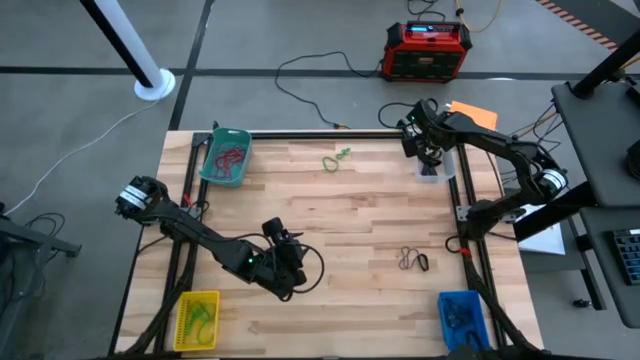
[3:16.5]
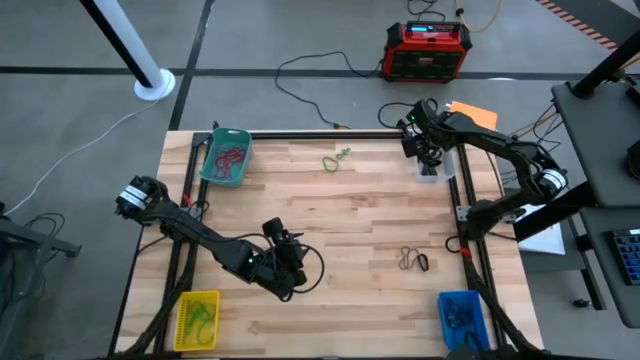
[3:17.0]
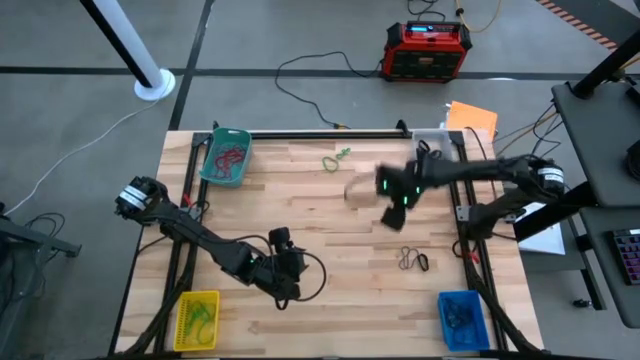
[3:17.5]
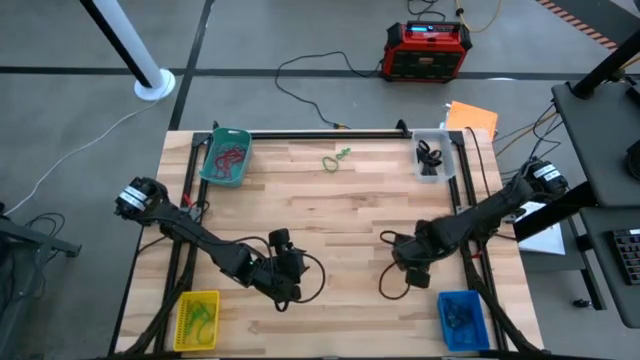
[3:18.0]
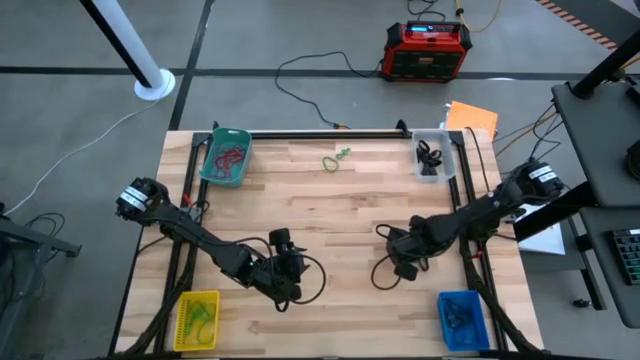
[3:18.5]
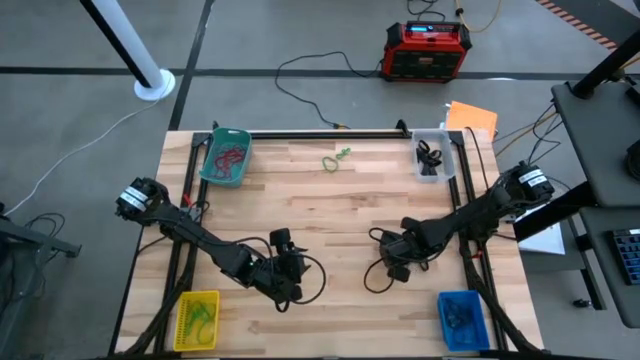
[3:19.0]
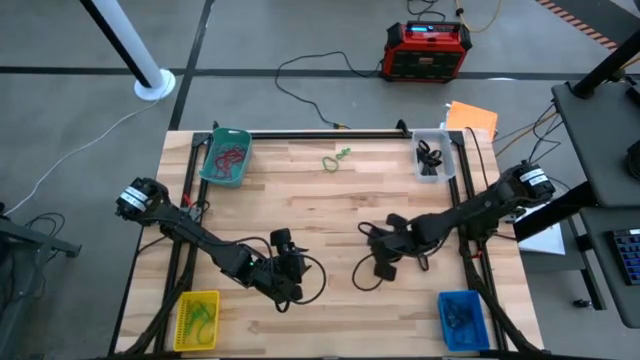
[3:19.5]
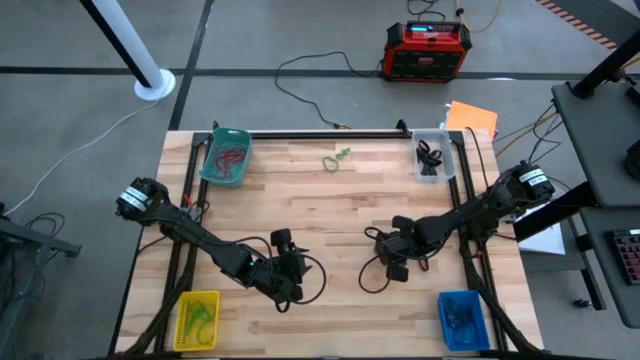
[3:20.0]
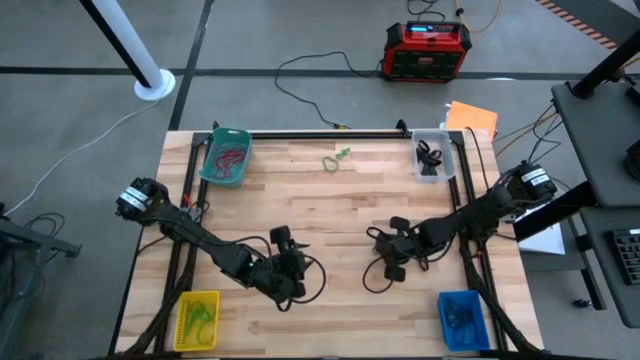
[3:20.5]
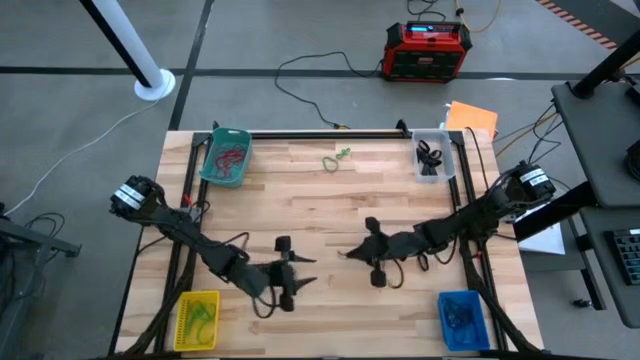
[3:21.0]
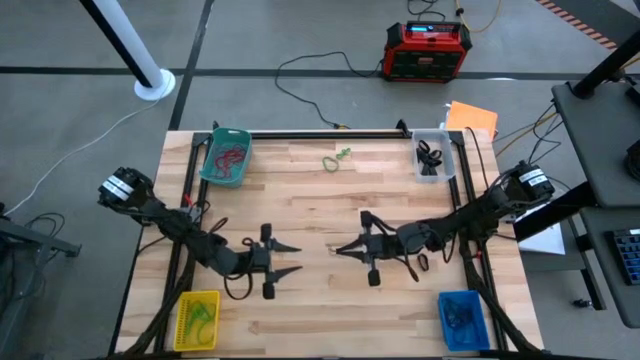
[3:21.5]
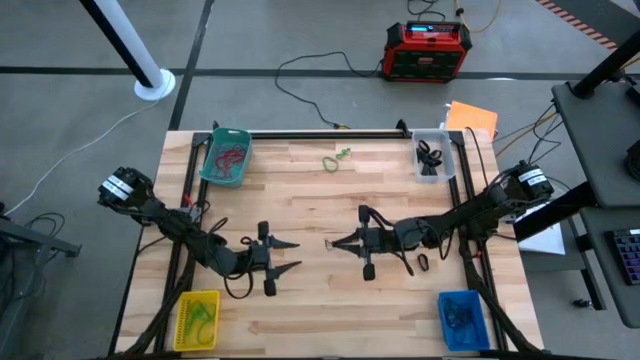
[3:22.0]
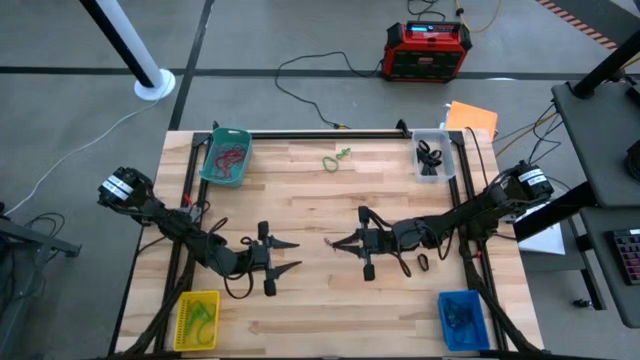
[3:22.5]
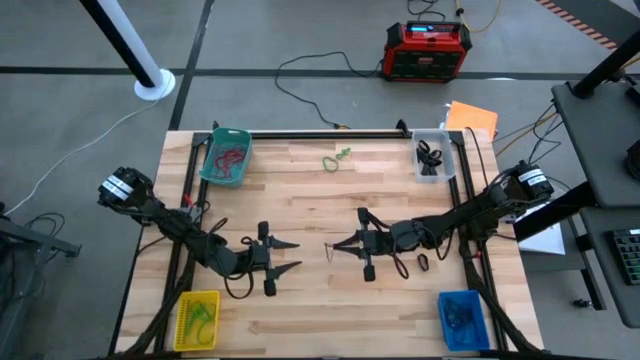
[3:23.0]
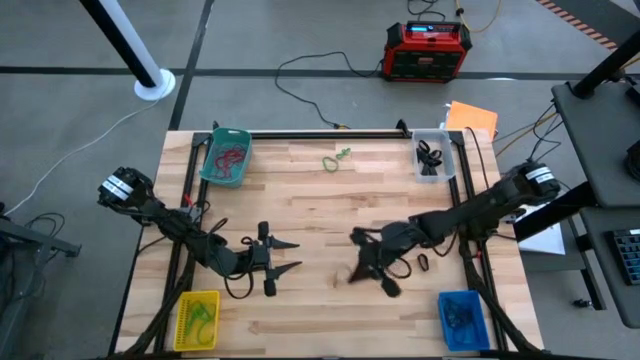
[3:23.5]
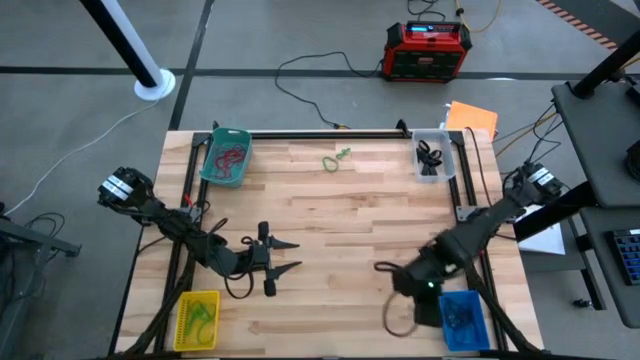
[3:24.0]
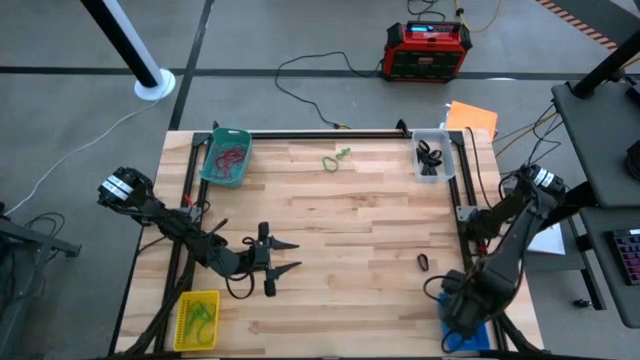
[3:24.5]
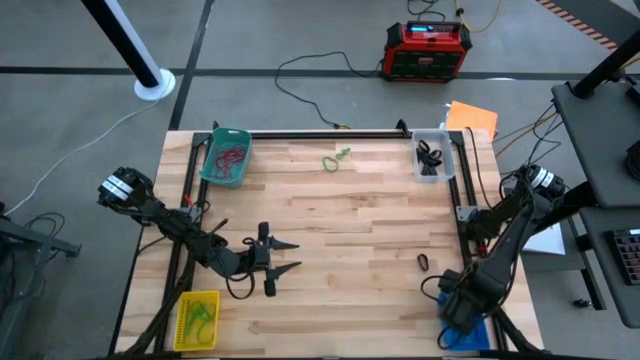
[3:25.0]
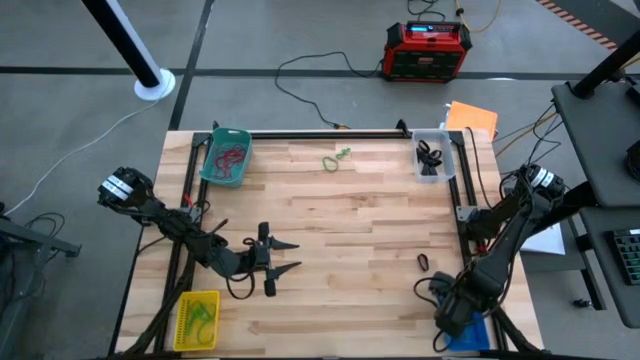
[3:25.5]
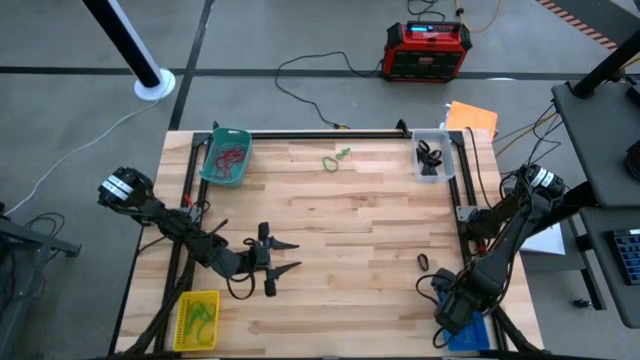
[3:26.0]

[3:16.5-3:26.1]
Task: Sort rubber bands into baskets
Put the violet rubber band into the blue bin

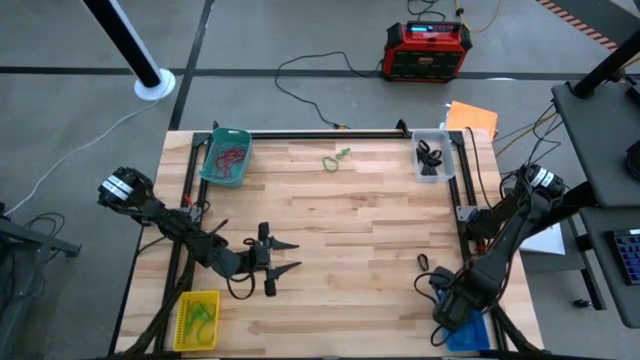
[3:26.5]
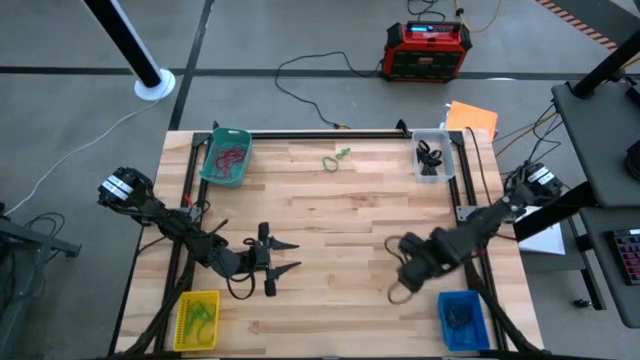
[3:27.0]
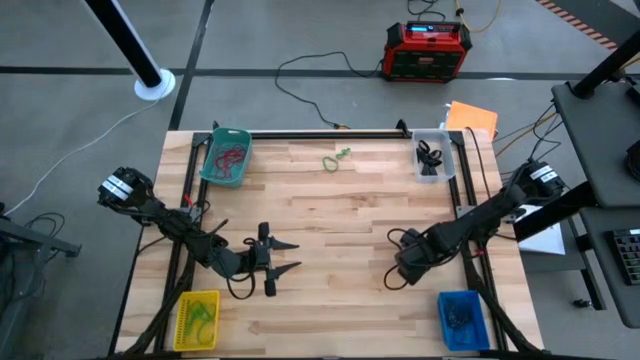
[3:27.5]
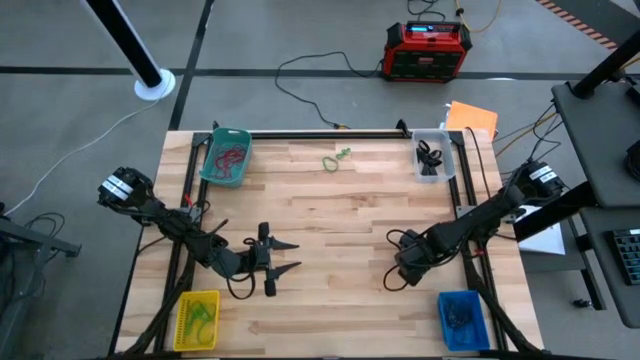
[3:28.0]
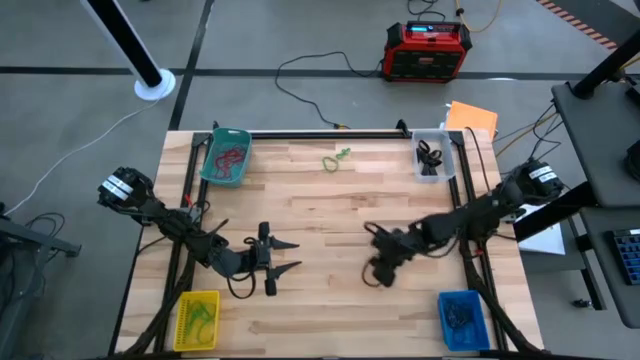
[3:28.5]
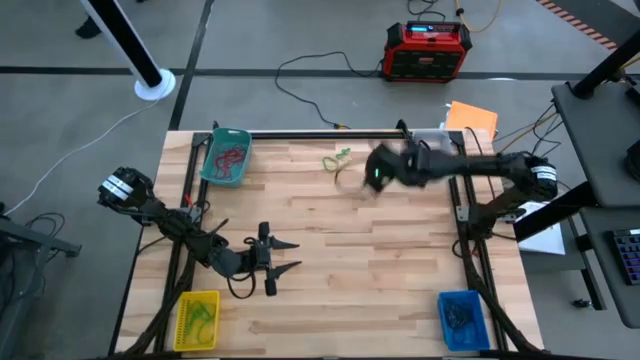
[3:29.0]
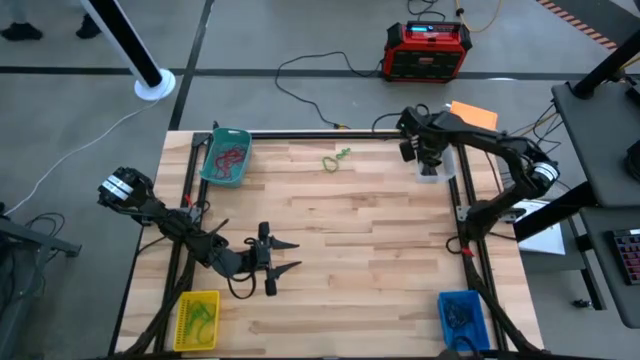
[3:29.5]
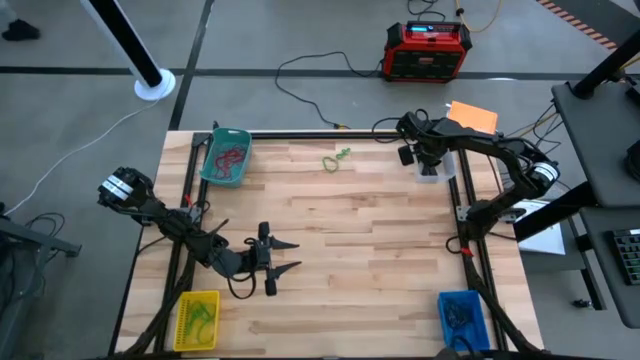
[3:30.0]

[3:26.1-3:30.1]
Put the black rubber band into the transparent bin

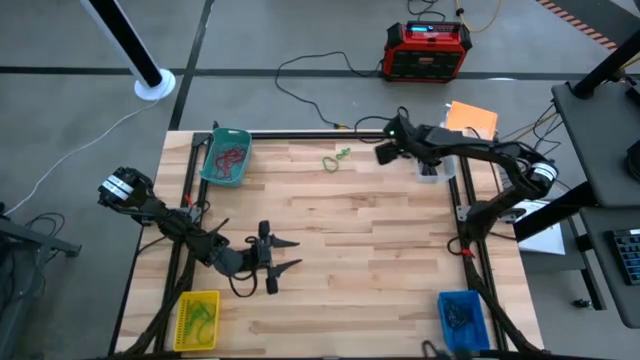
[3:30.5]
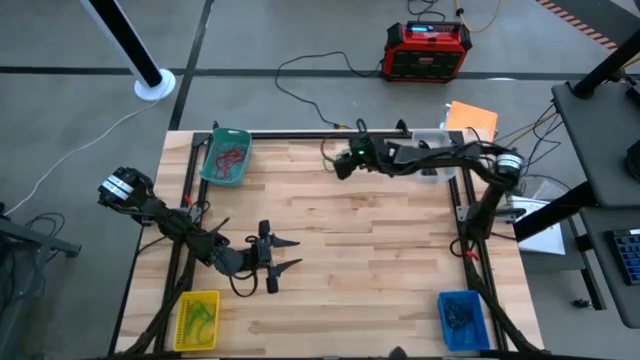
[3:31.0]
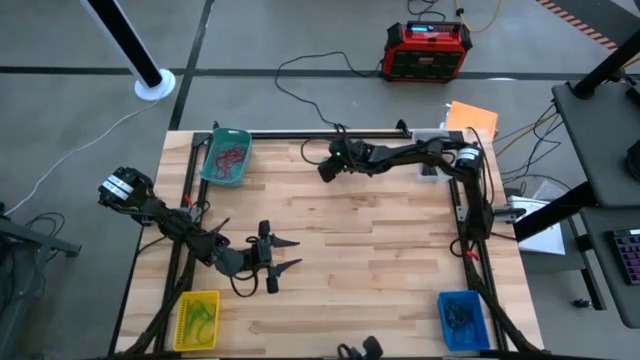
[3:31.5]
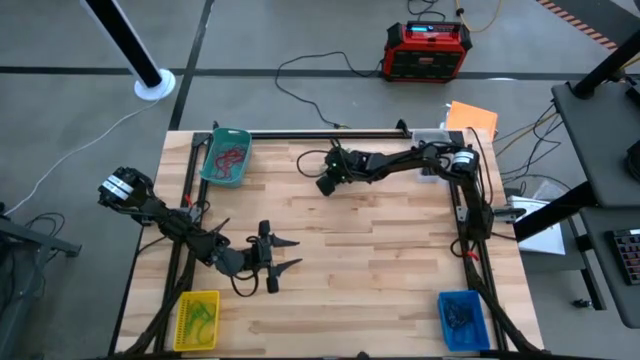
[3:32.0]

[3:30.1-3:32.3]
Put the green rubber band into the yellow bin
